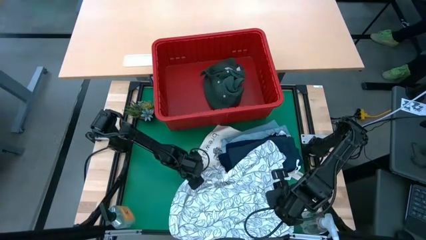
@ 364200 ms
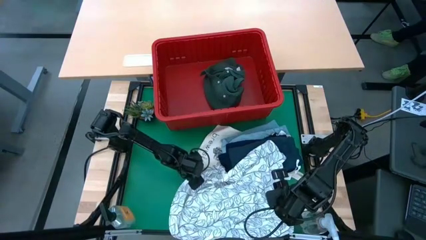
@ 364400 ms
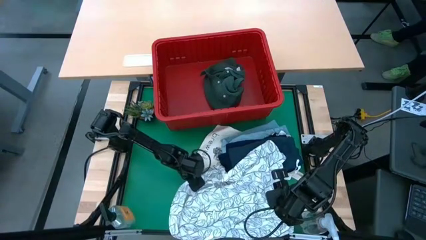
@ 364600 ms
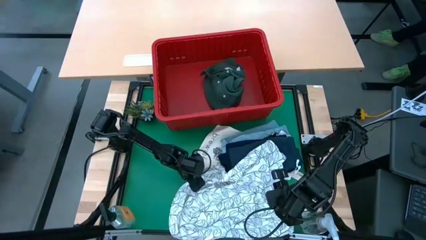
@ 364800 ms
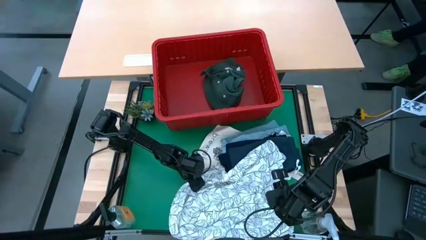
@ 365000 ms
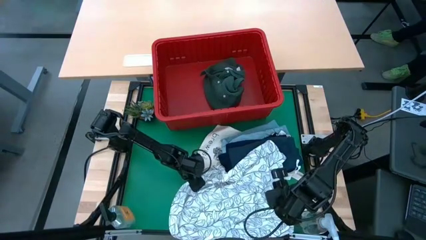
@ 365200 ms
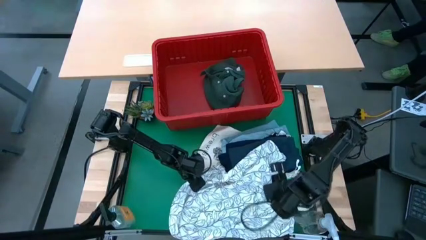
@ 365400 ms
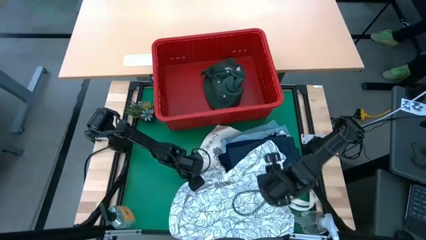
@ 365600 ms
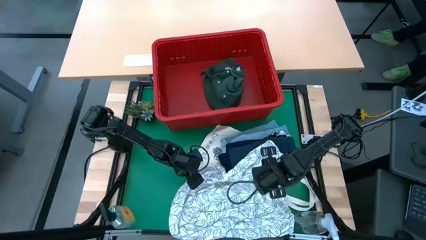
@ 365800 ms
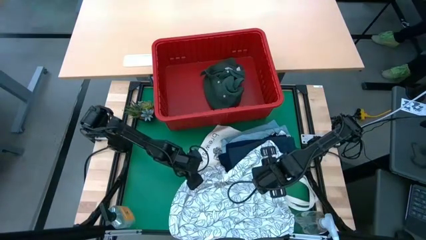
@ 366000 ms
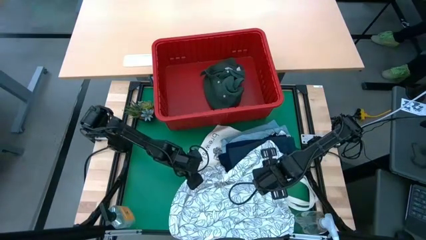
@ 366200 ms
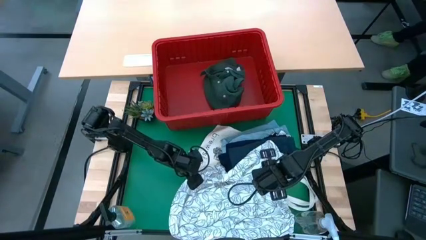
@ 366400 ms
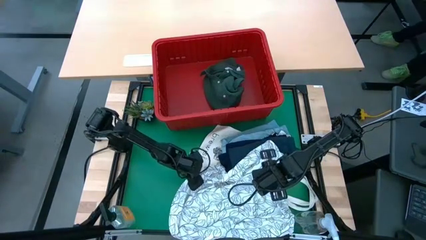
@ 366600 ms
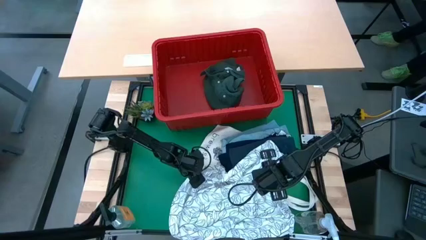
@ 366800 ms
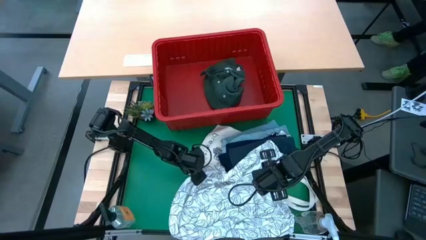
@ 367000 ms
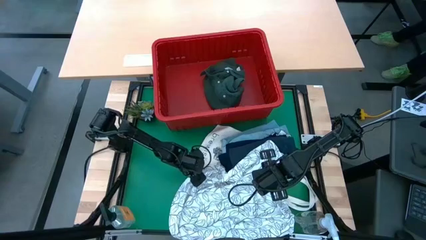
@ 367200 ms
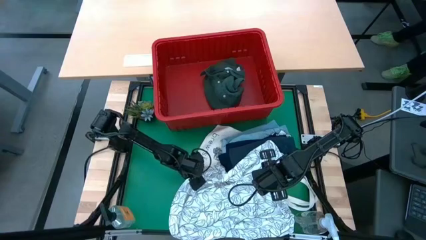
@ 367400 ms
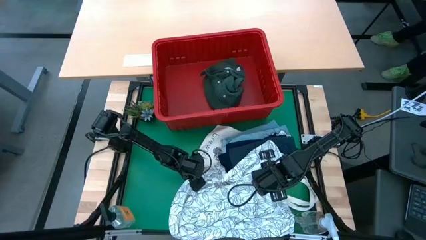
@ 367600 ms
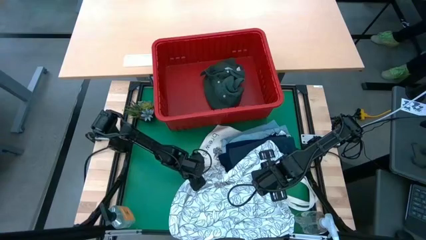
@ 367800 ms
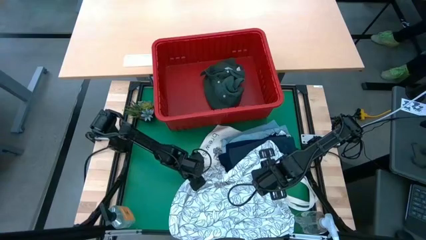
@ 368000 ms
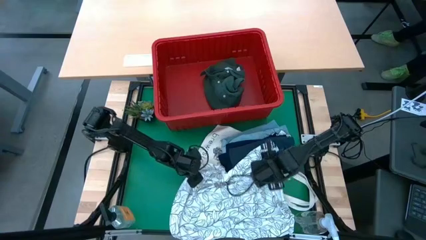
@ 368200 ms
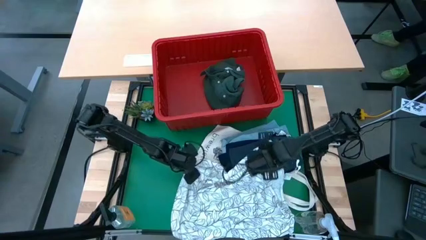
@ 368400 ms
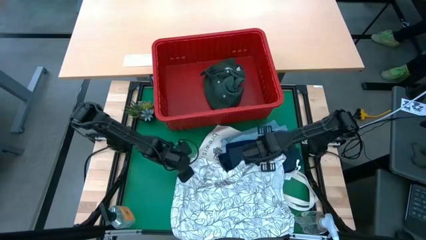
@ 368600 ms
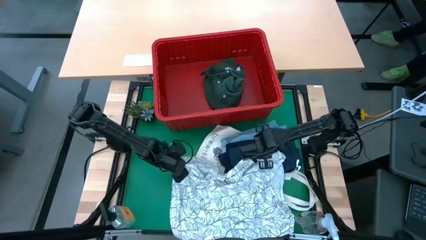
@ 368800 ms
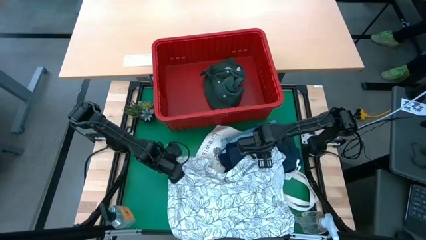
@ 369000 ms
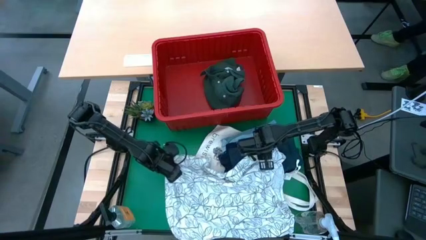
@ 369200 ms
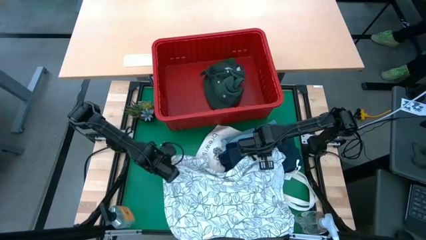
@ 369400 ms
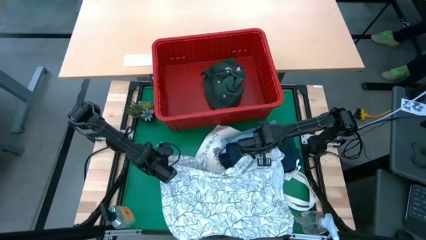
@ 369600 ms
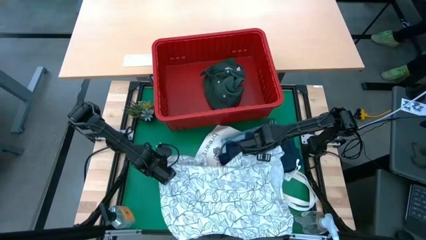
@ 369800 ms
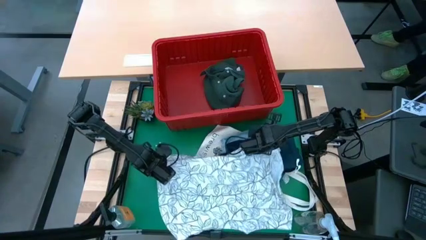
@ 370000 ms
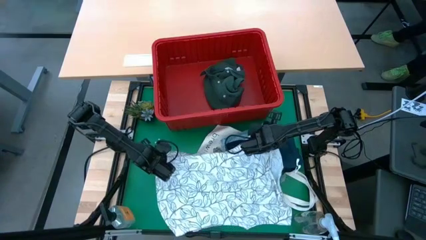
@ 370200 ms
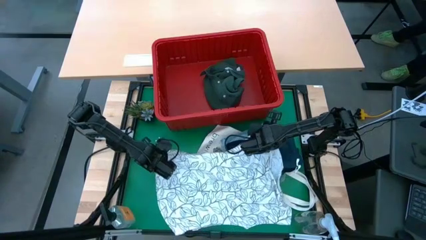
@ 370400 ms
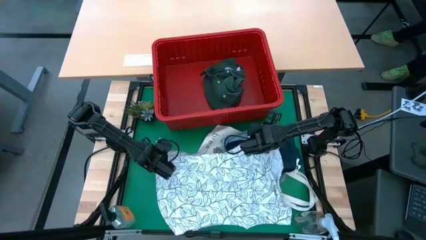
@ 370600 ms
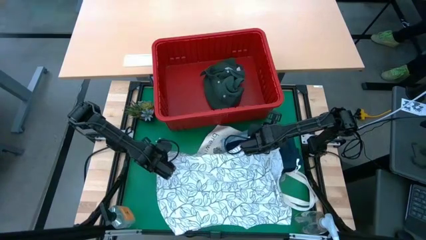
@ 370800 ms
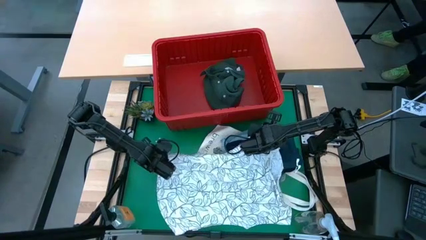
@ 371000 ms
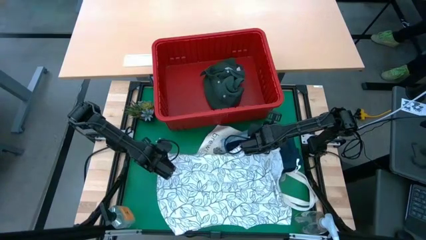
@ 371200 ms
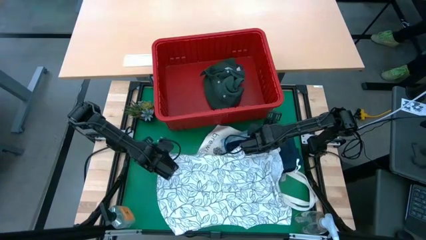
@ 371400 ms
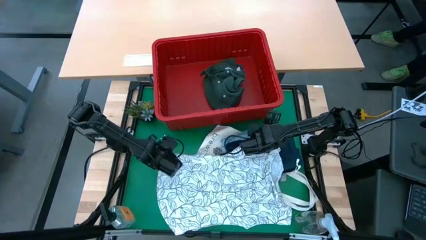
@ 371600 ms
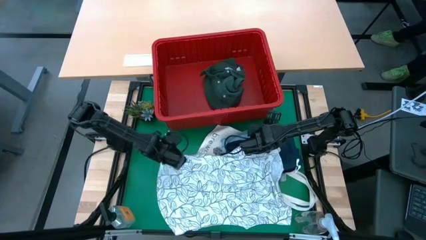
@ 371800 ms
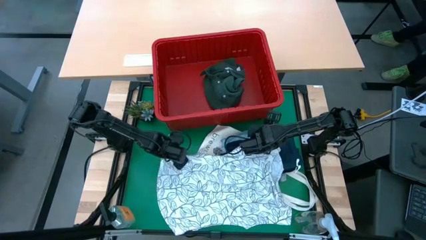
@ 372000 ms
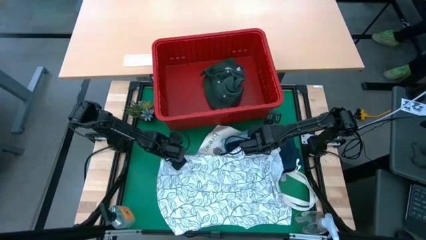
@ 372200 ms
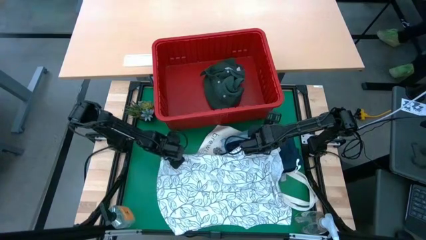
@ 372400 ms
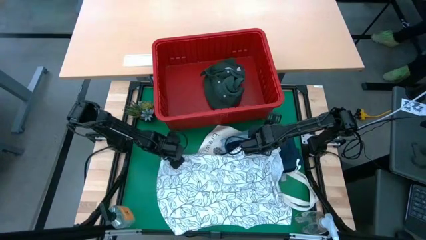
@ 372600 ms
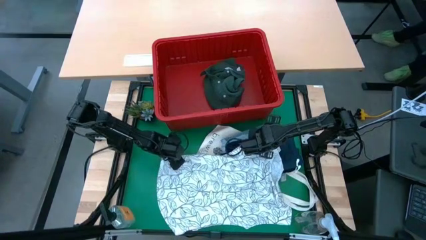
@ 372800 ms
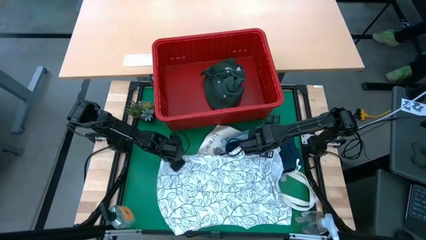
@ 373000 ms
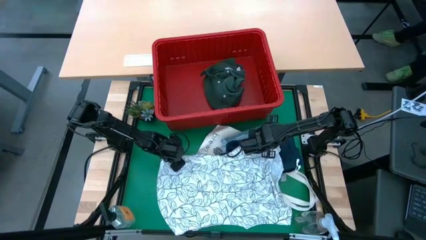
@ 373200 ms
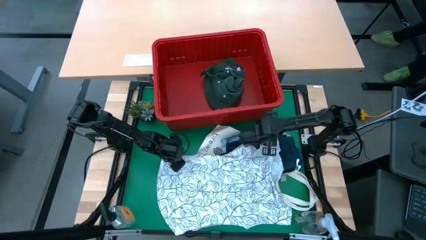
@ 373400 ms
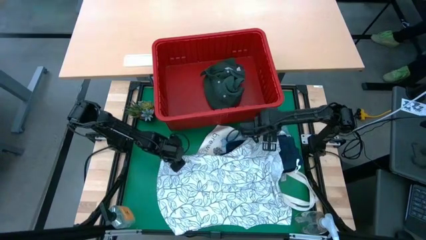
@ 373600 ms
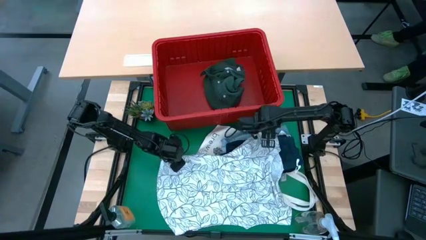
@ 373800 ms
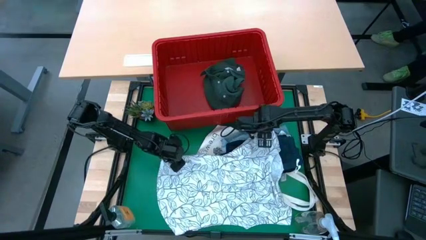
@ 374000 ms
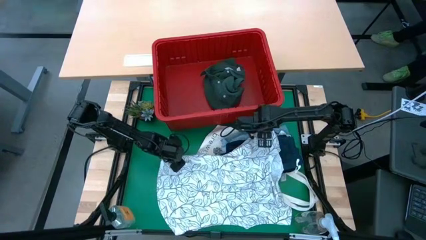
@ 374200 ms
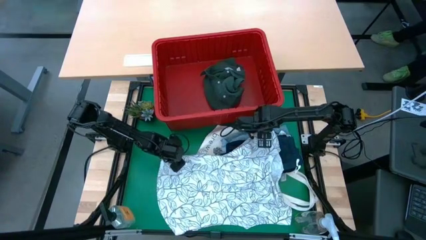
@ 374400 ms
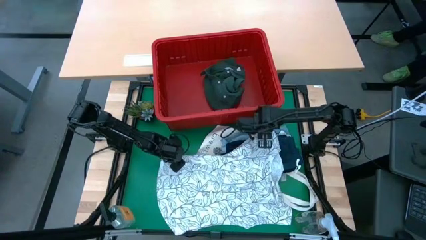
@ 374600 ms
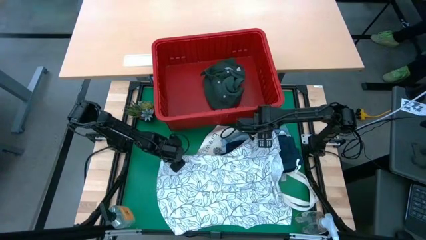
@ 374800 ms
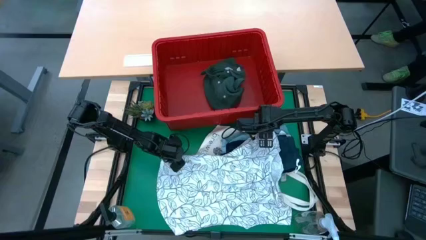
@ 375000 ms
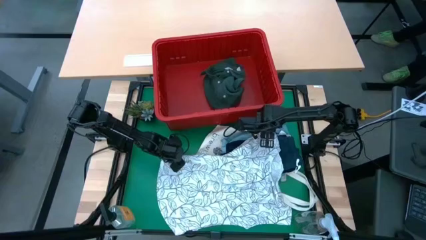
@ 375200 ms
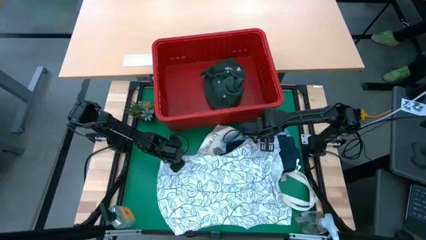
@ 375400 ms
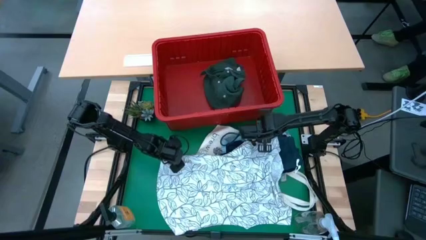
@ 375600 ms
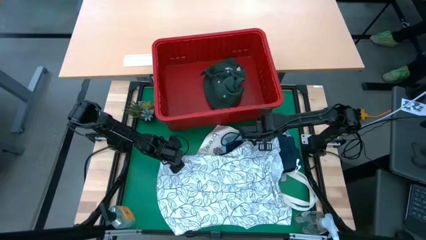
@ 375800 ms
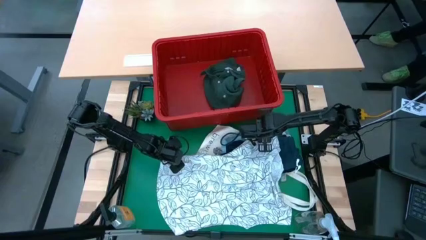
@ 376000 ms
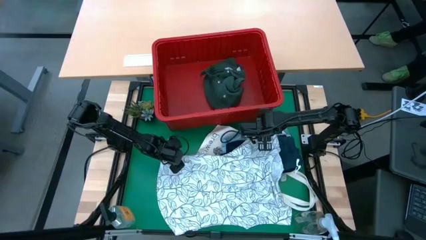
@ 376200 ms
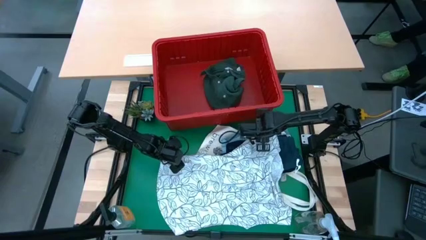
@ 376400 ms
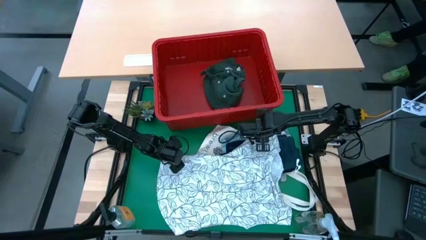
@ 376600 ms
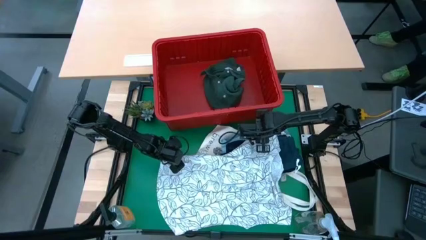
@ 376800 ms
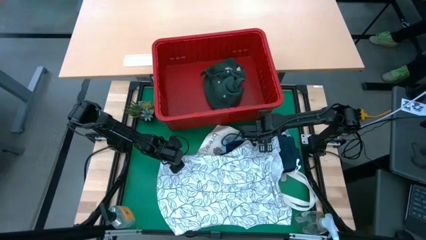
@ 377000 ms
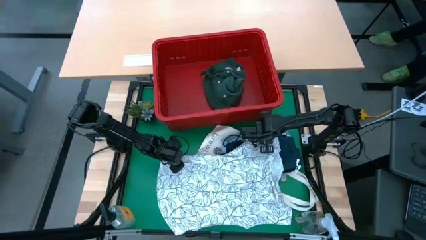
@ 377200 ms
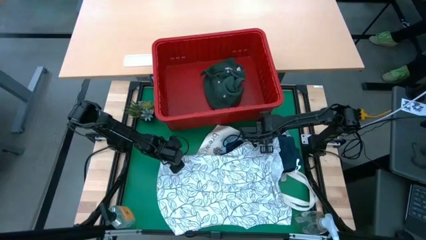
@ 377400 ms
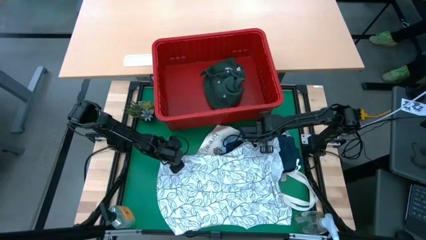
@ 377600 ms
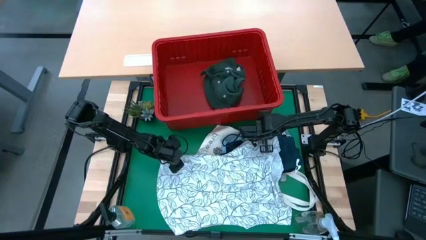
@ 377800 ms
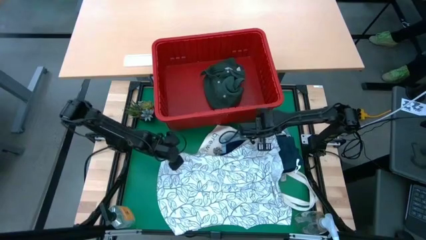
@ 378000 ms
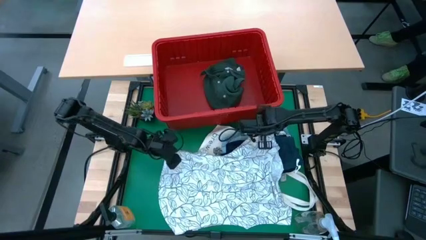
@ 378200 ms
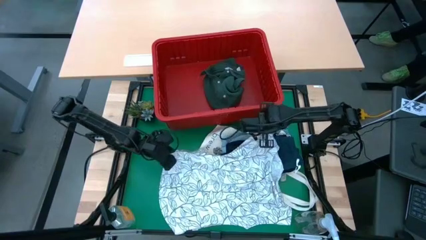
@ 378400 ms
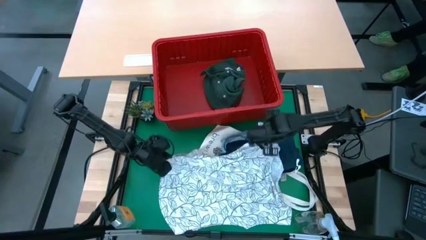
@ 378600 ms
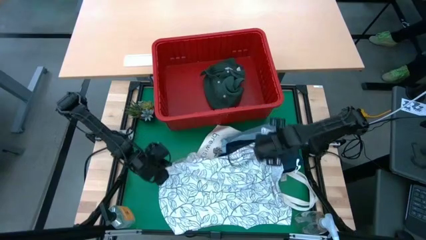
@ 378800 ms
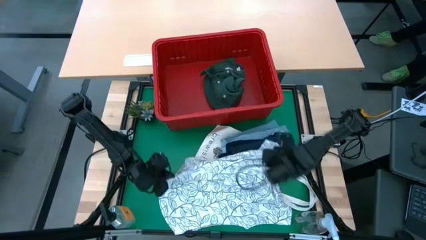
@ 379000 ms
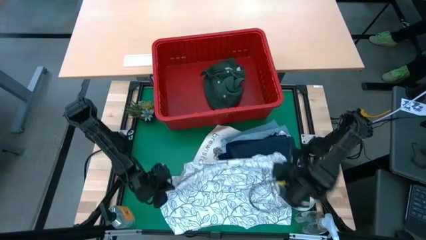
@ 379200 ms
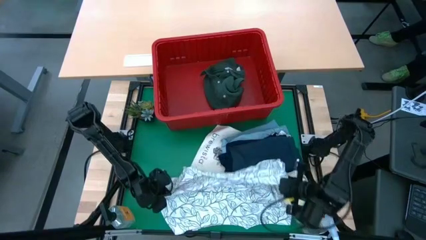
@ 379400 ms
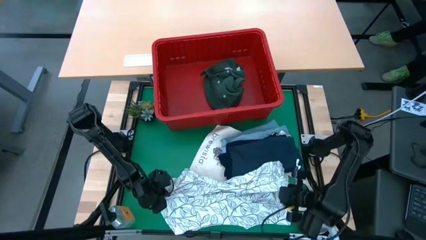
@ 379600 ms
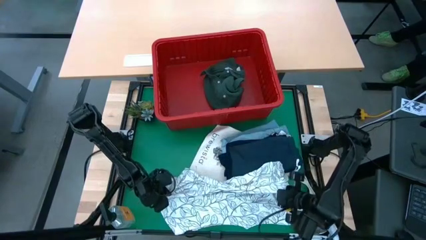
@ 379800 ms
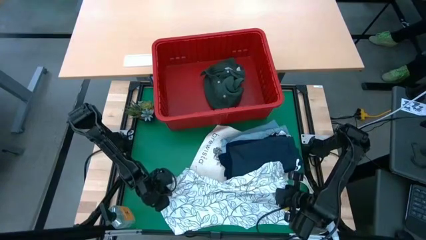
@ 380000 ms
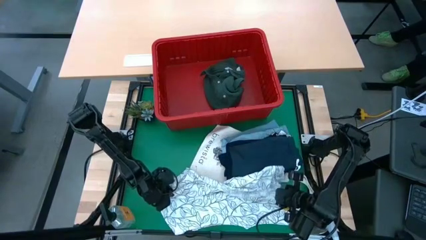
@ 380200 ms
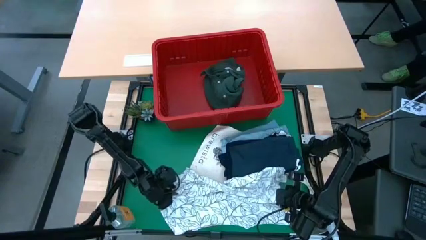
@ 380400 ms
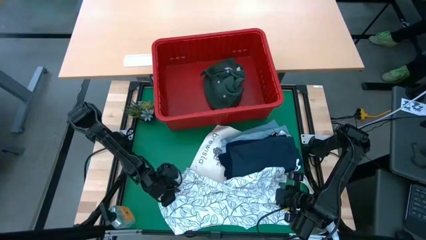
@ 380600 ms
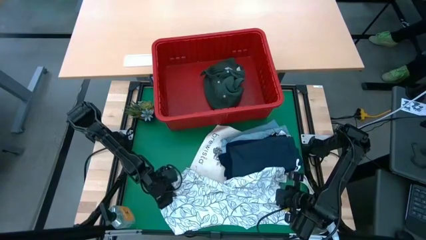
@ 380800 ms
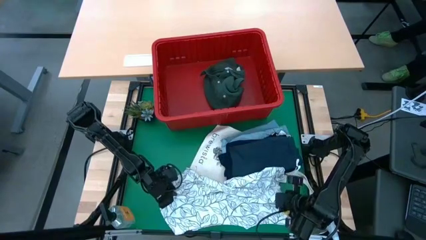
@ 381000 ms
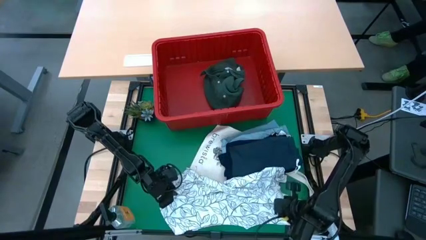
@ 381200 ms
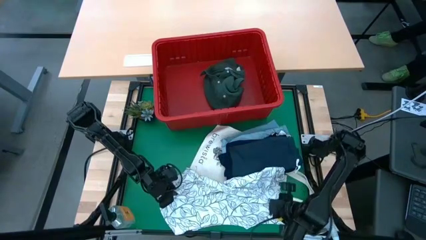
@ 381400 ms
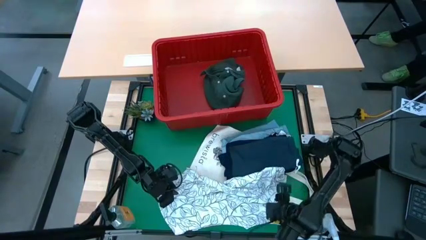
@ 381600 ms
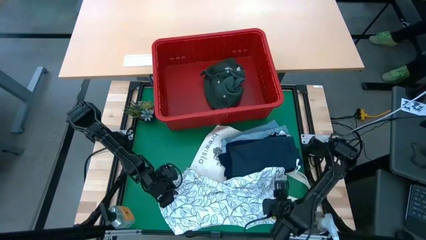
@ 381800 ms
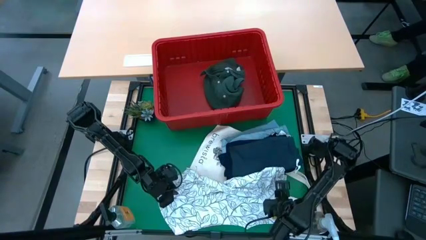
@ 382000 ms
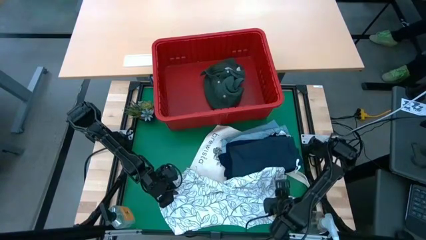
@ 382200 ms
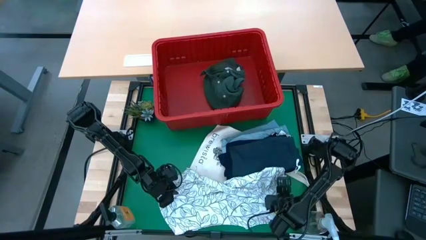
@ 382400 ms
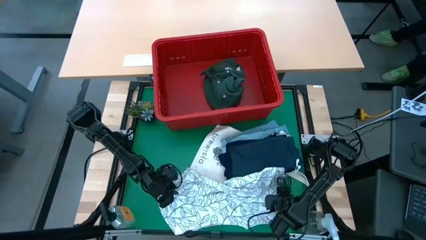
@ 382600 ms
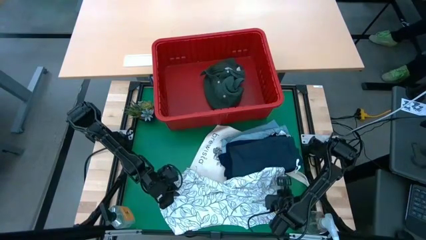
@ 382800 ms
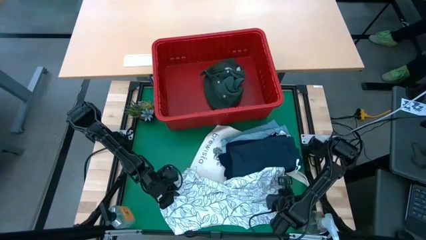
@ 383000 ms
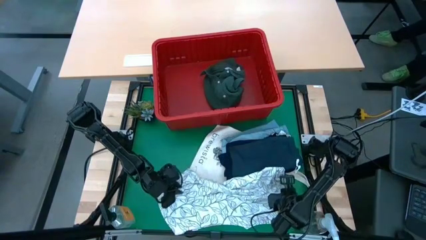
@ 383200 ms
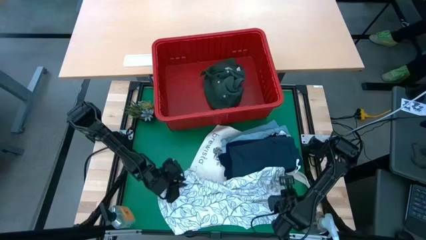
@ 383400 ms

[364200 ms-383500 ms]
Task: Fold laundry
Fold the patterned white shirt
